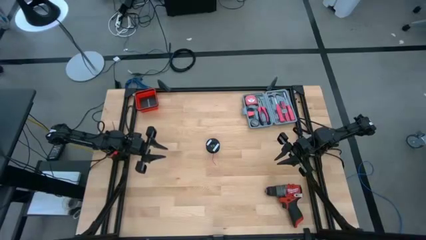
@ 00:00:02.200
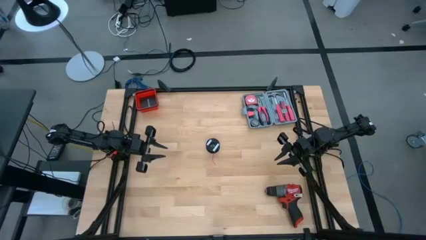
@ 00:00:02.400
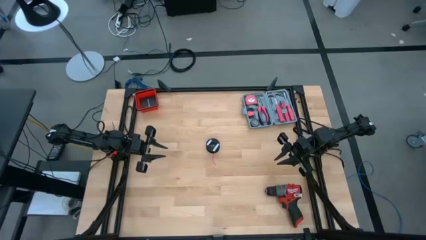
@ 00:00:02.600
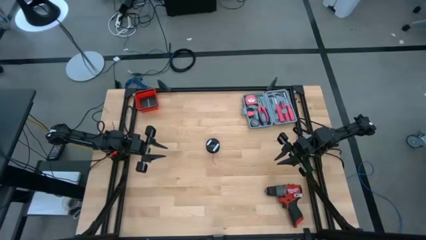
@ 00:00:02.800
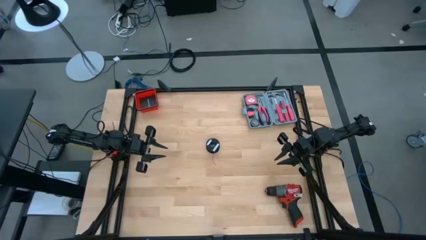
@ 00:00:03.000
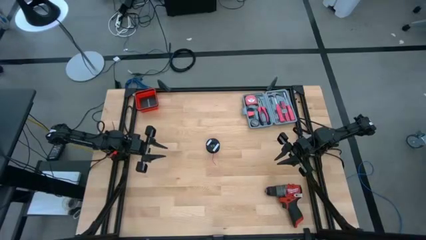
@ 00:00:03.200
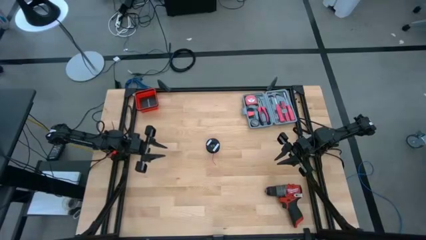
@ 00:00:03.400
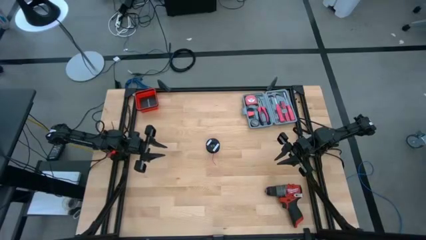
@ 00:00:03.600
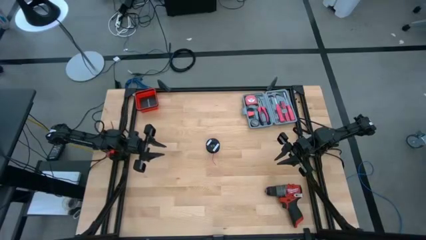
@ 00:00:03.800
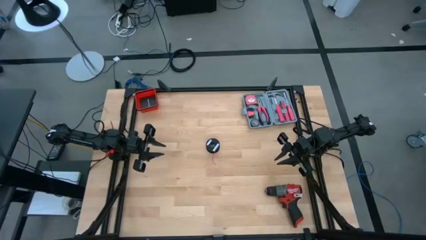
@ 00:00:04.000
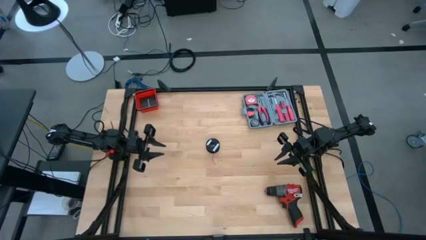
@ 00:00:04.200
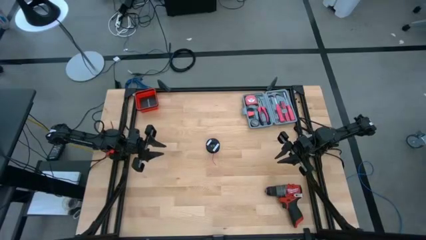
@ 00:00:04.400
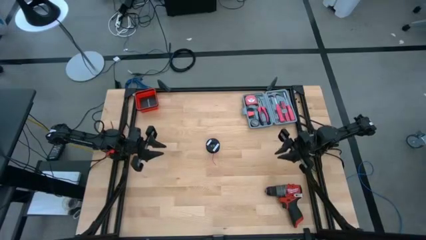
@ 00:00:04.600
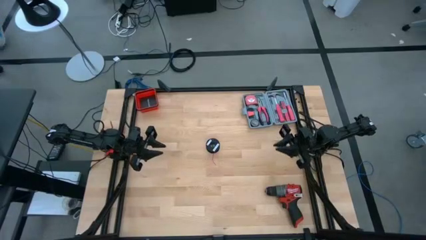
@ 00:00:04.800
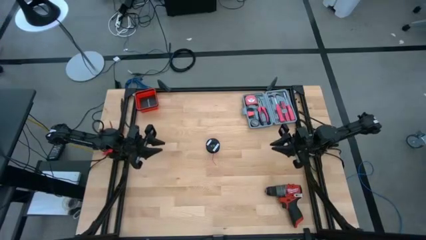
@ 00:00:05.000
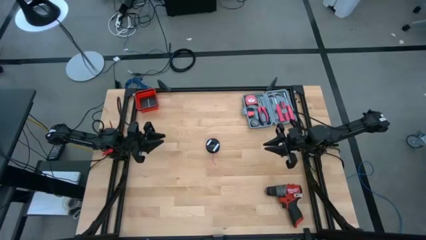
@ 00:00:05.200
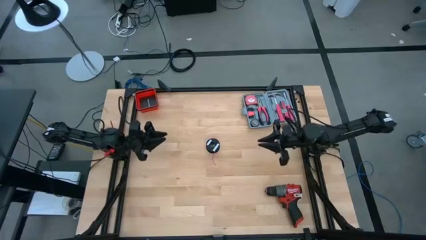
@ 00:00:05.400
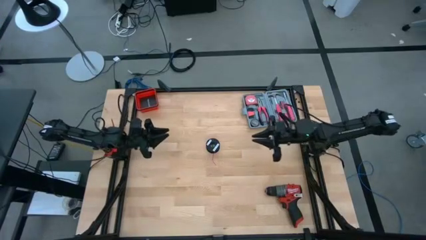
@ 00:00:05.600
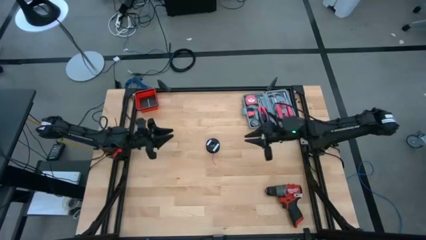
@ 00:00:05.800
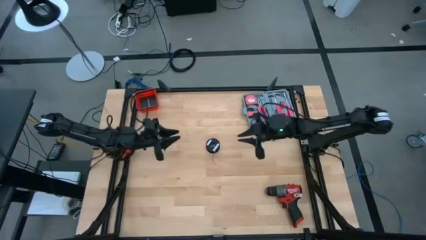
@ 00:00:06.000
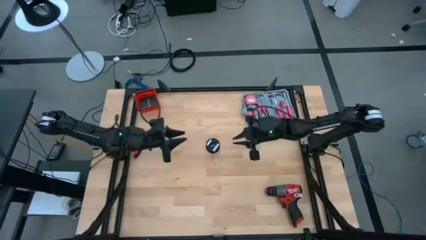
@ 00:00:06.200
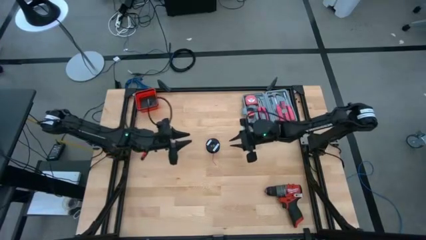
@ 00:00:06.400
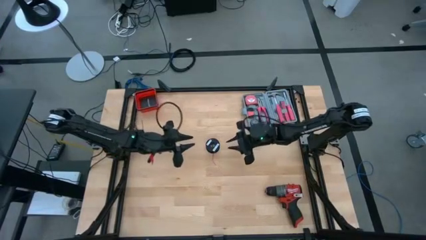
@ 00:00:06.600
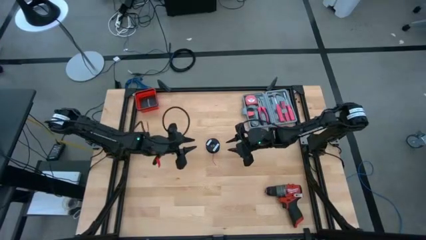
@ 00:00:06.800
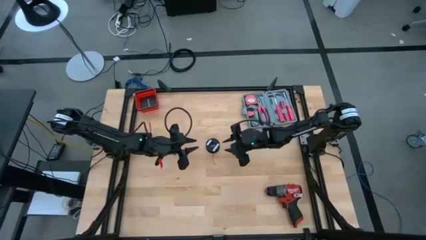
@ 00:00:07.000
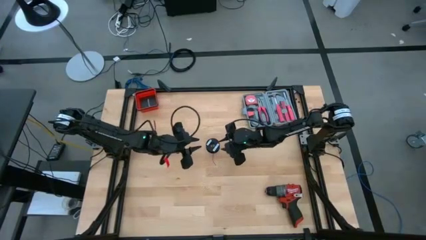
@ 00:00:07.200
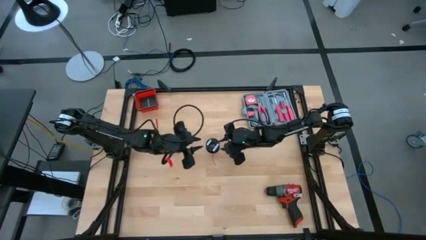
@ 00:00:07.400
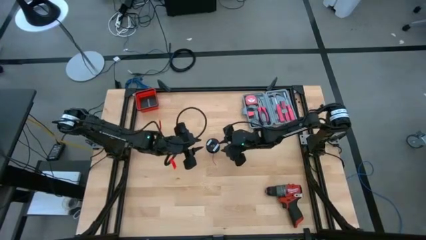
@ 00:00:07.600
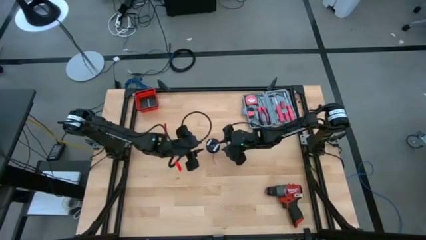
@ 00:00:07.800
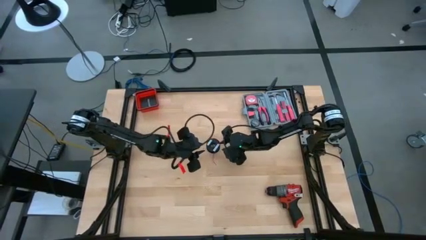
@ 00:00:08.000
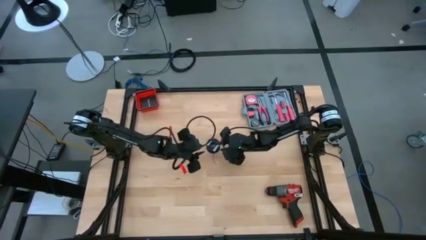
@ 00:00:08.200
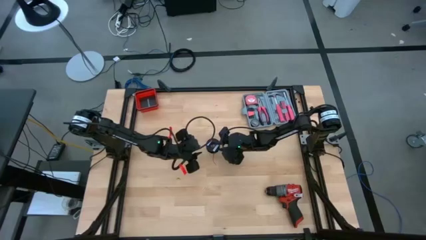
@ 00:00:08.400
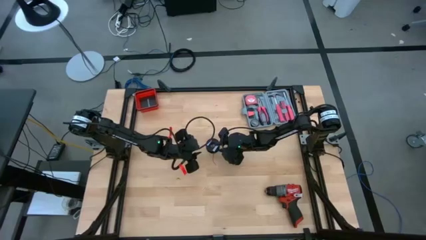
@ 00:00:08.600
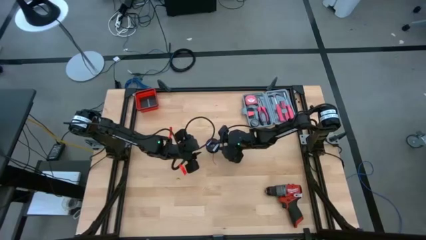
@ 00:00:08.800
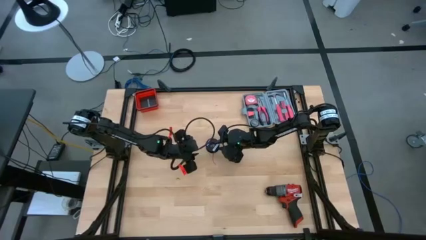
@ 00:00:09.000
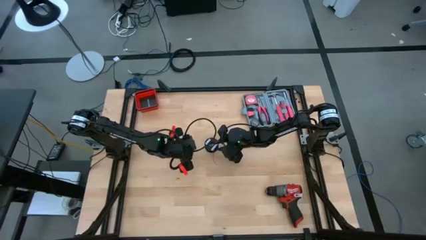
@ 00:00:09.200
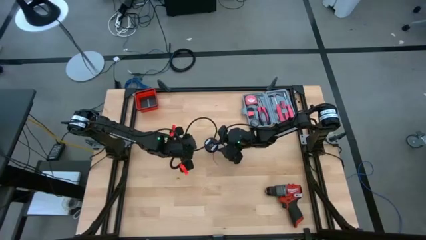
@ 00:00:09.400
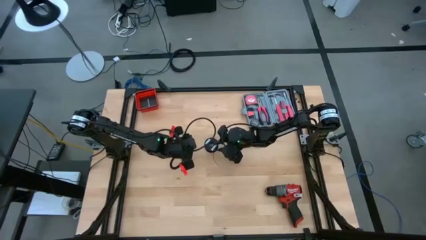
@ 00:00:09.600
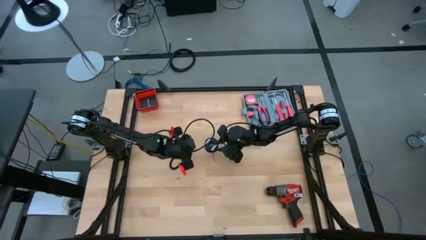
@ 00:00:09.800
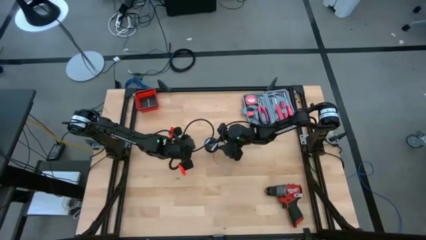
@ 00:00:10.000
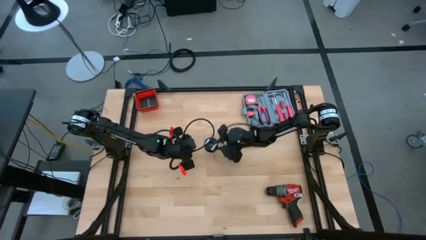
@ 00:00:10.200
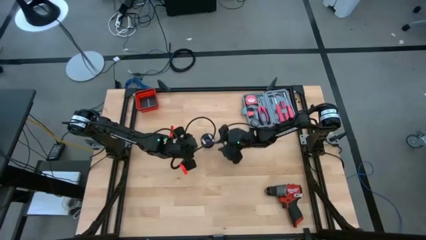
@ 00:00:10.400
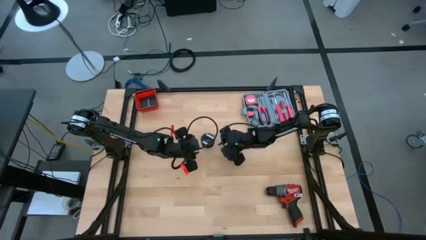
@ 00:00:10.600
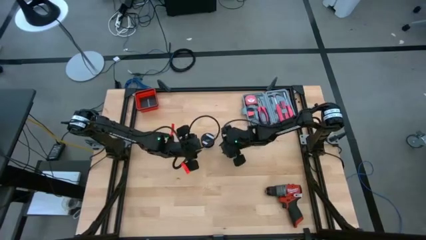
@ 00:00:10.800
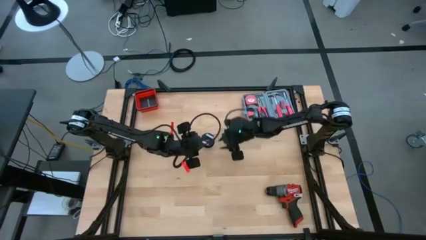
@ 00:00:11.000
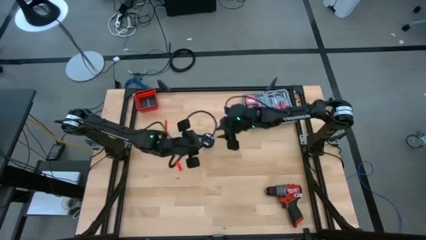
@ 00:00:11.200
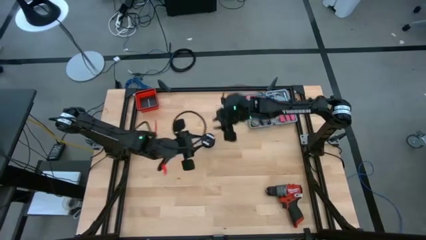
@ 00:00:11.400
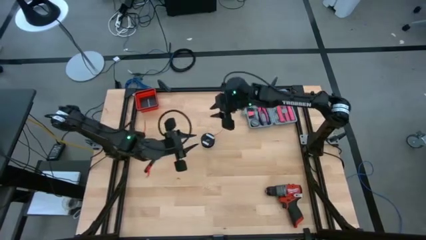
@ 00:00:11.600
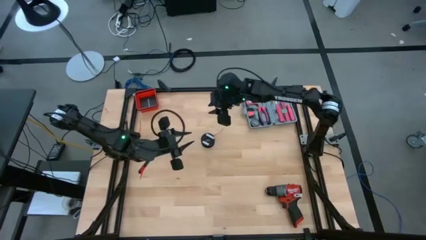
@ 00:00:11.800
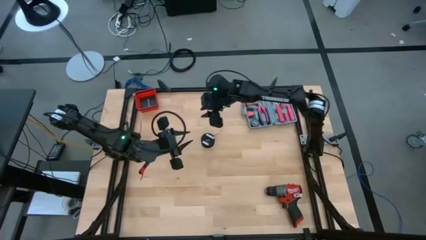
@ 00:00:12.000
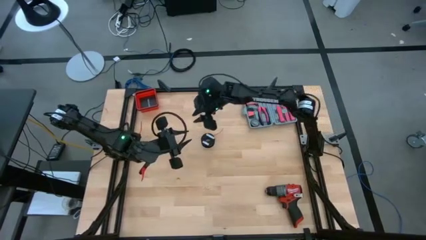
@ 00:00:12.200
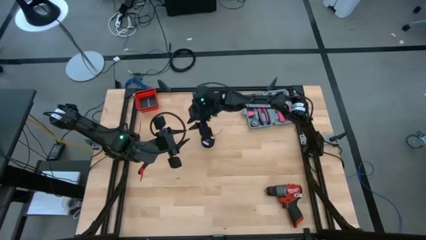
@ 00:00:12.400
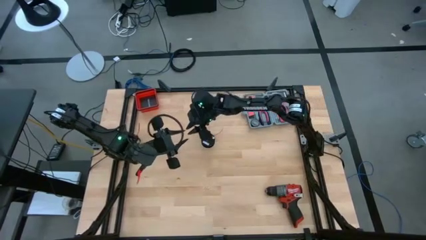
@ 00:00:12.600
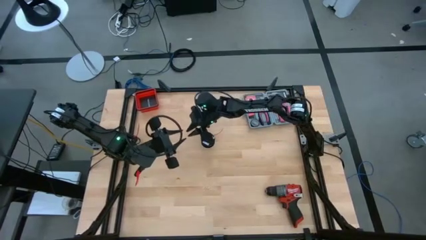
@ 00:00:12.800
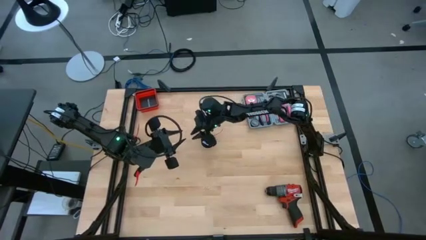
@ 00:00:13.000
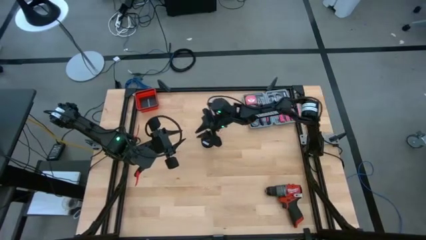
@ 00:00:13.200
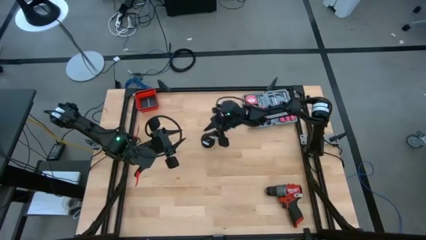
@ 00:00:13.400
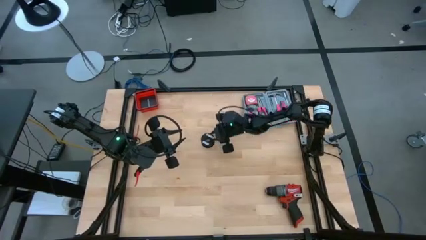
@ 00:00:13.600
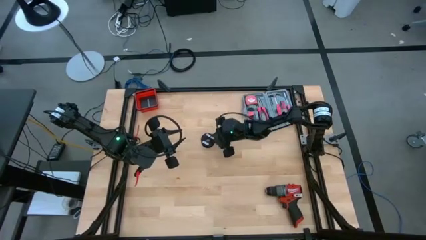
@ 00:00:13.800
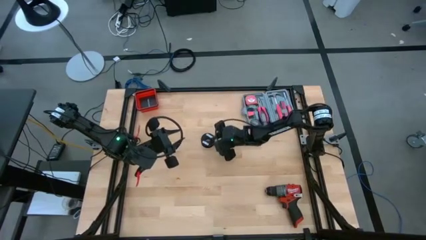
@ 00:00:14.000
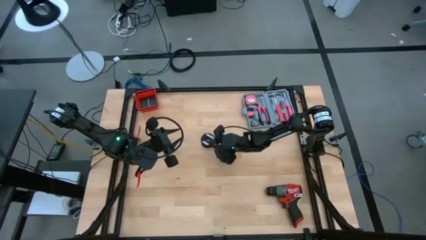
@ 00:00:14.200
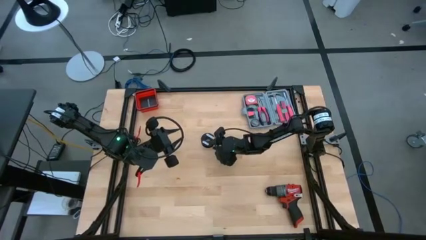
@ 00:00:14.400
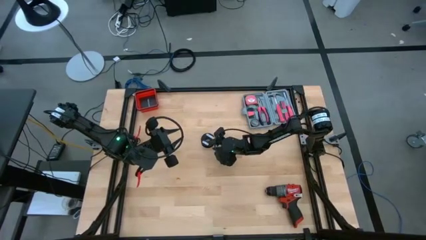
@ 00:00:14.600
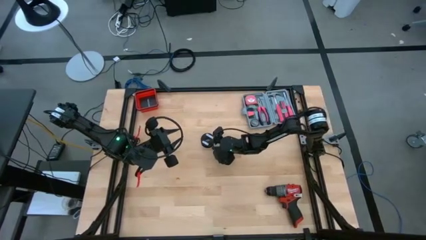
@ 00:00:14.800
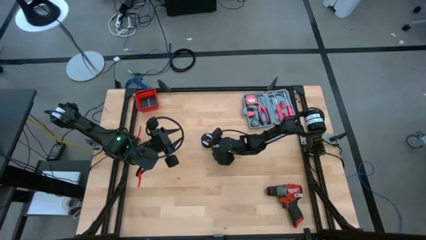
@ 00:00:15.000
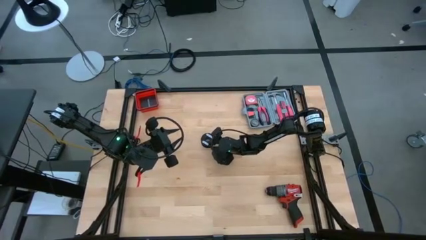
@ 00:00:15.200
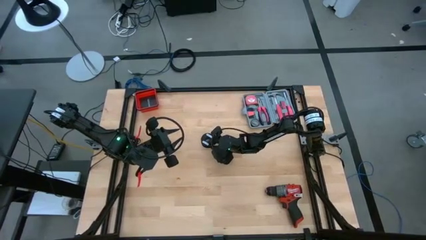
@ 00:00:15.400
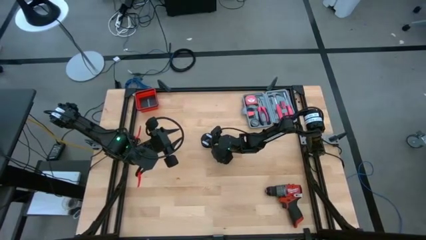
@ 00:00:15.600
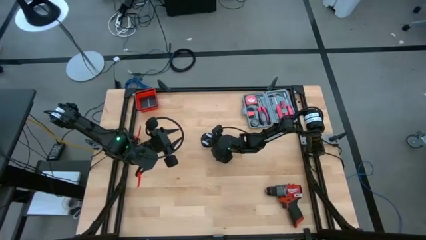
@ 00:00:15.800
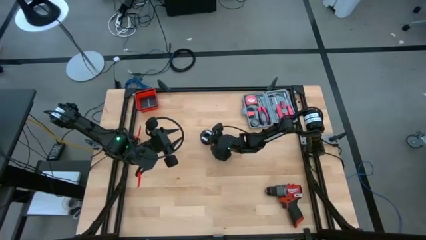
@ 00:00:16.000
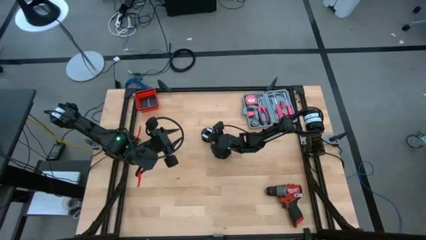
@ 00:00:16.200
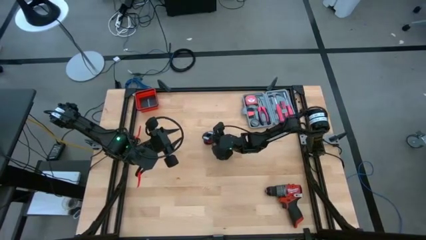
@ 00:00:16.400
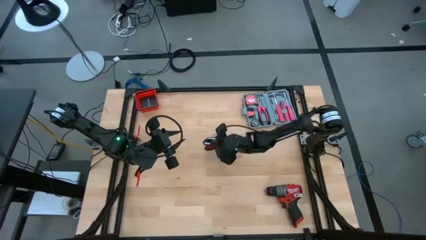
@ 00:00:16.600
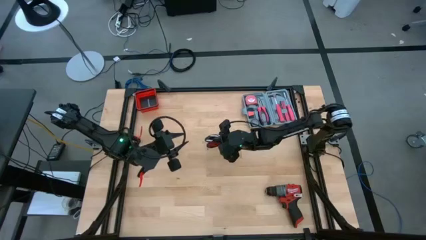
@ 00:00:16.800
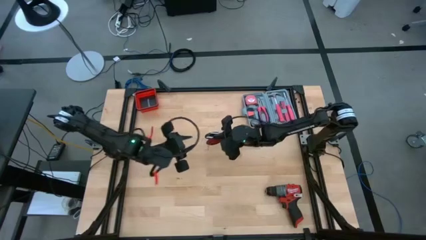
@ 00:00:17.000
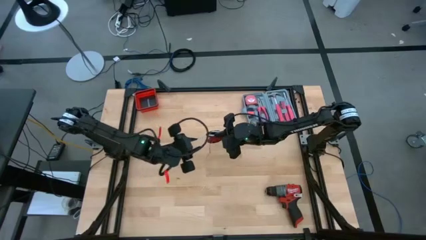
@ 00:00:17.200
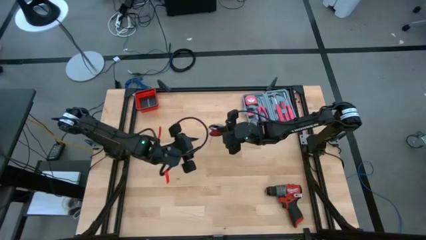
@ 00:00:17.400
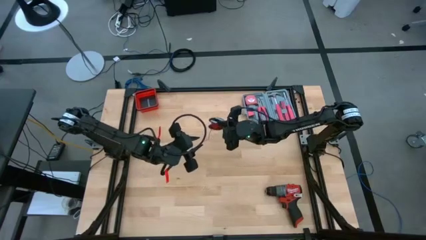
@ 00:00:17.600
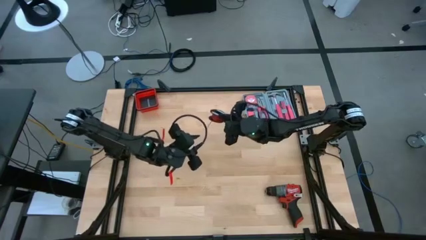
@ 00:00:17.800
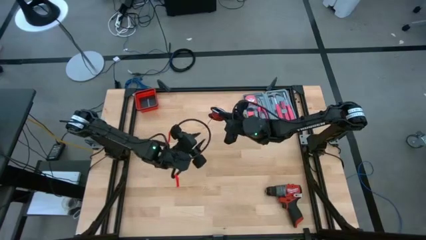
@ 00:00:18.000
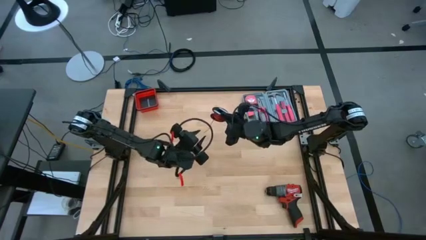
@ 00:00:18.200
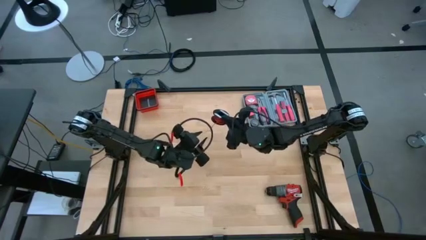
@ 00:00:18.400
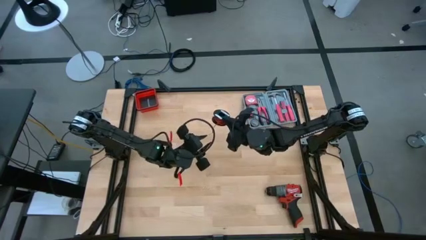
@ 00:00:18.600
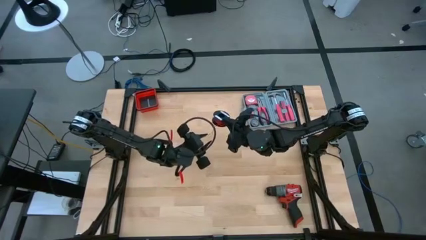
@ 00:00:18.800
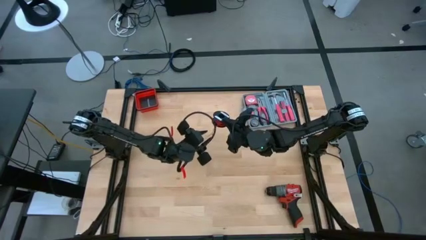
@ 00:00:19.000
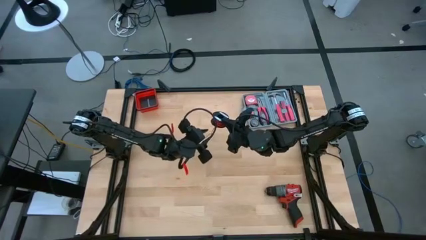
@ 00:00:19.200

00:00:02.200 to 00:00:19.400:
Task: Coil cords
Uncoil the red wire from the black spool
